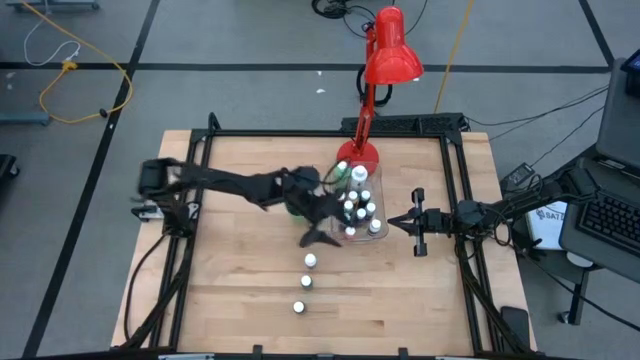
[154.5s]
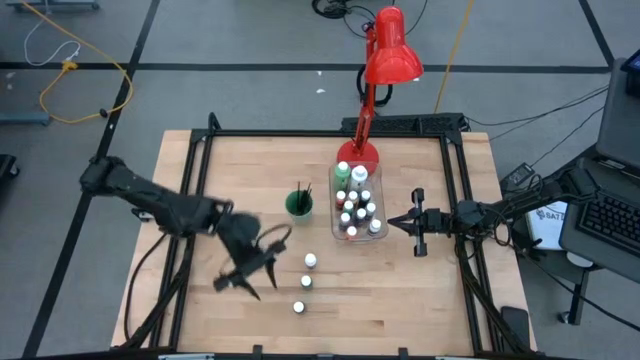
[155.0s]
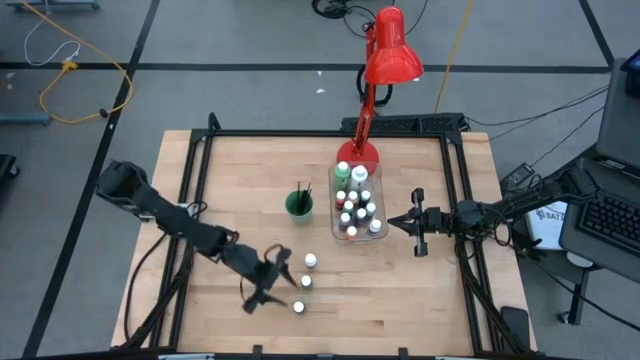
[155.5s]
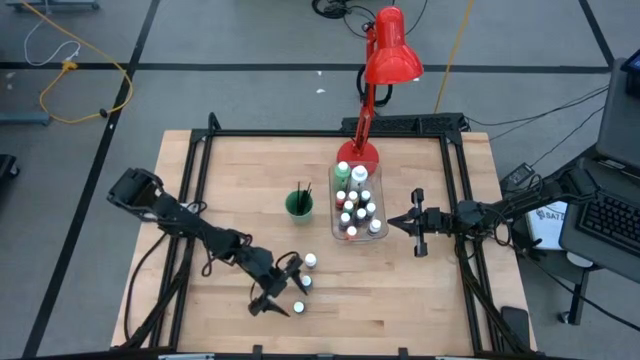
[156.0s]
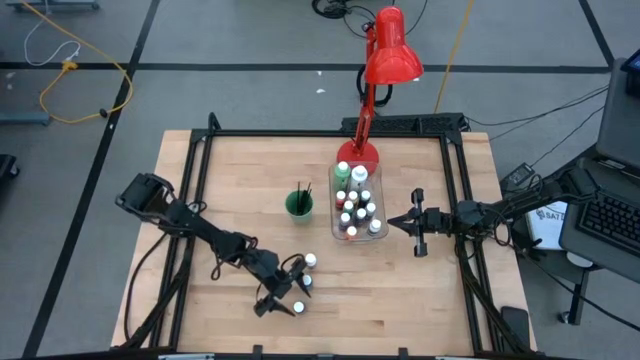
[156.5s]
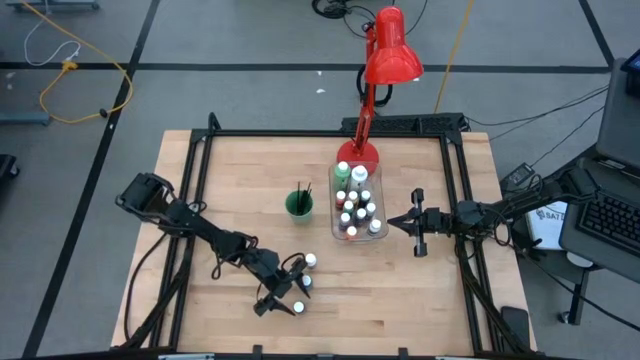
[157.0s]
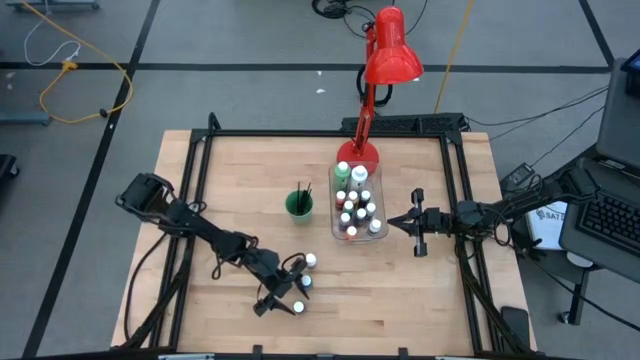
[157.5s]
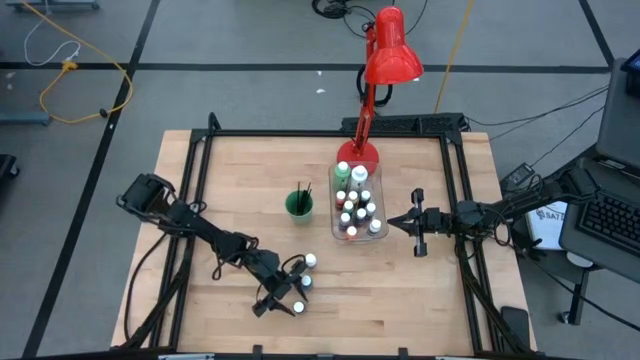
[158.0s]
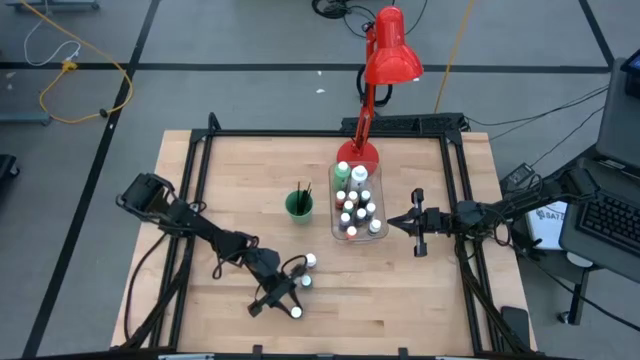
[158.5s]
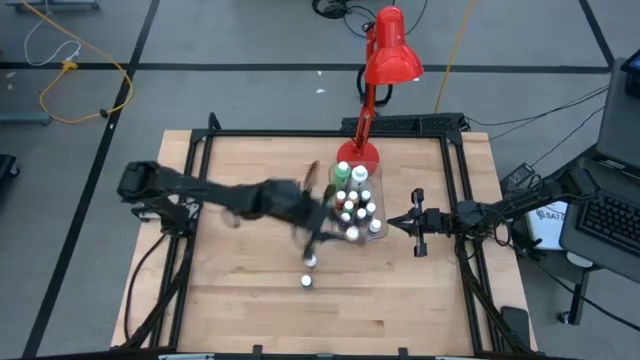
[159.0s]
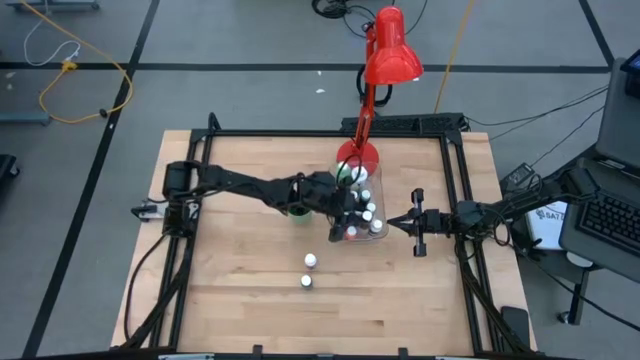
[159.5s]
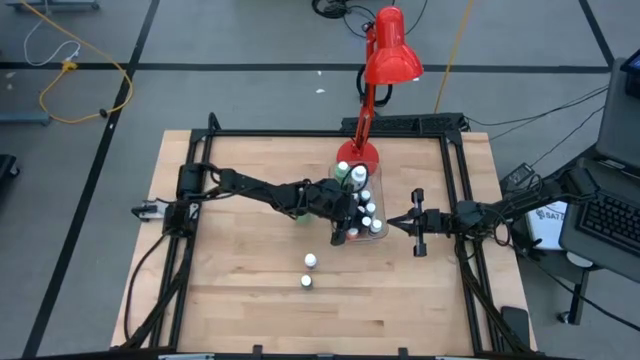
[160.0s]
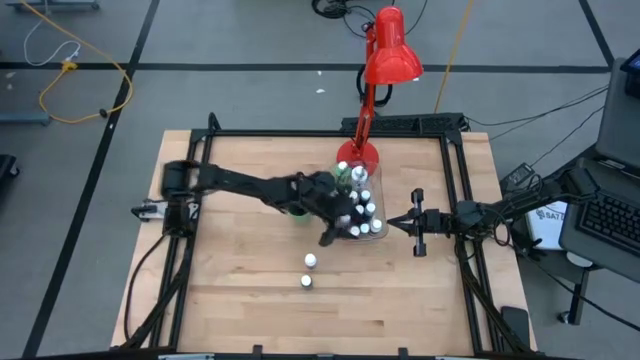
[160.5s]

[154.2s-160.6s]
Task: Pick & Place Paint Supplies
Put the black paint bottle into the transparent bin

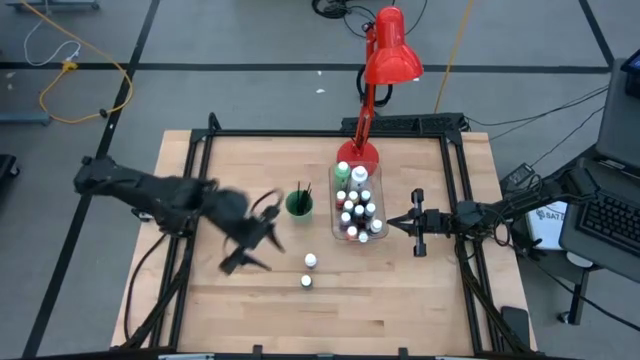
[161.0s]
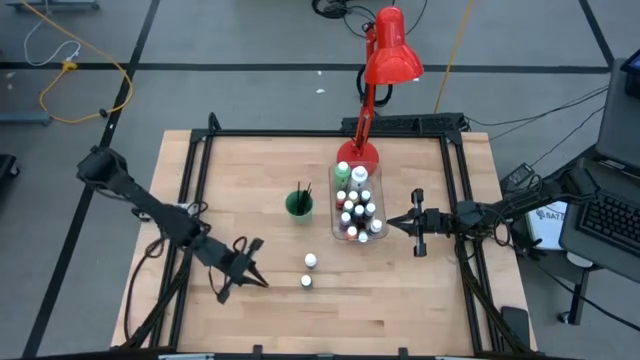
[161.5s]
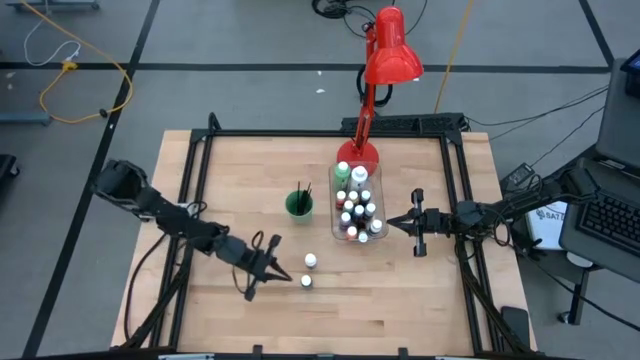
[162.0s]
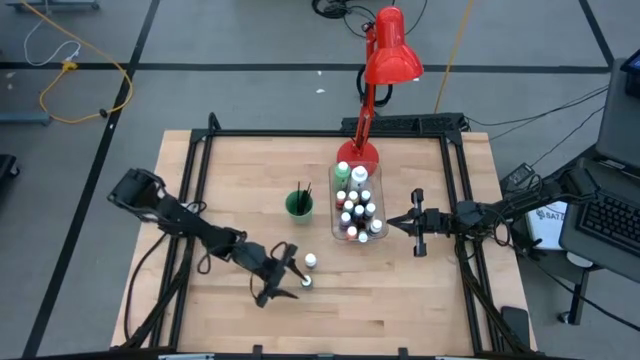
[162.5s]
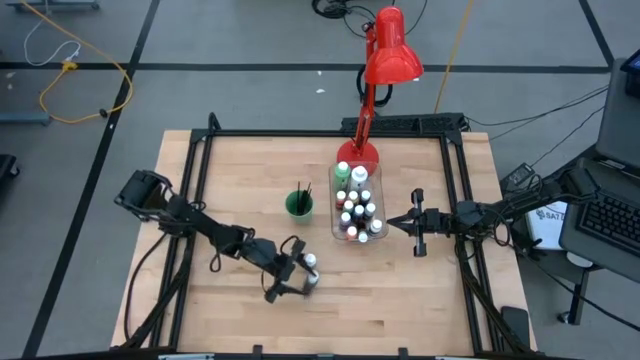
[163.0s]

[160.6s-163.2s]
Put the small green paint bottle into the transparent bin

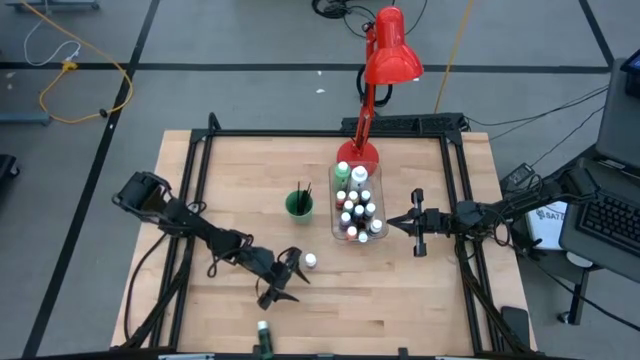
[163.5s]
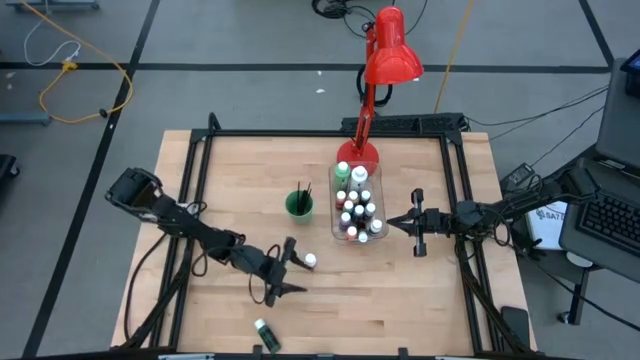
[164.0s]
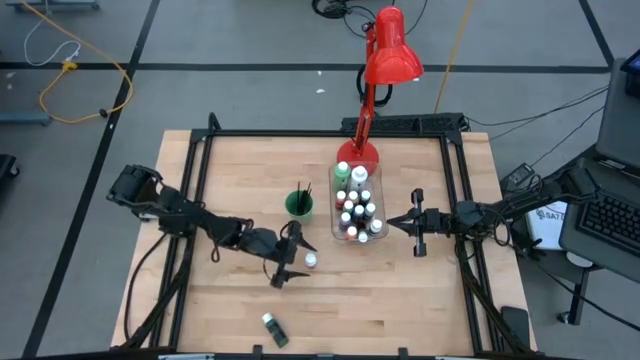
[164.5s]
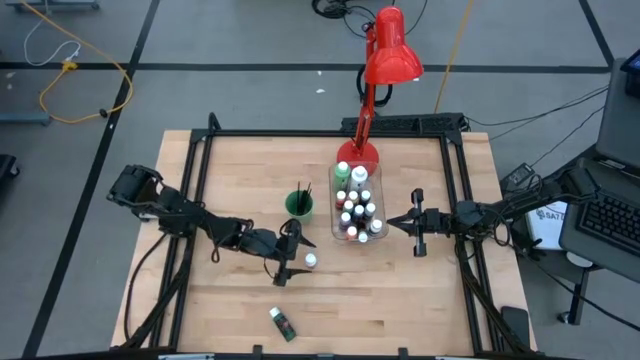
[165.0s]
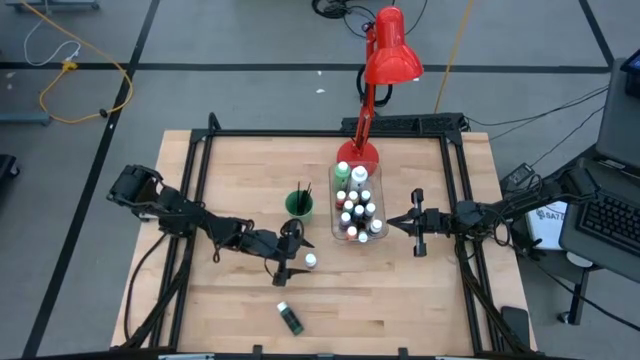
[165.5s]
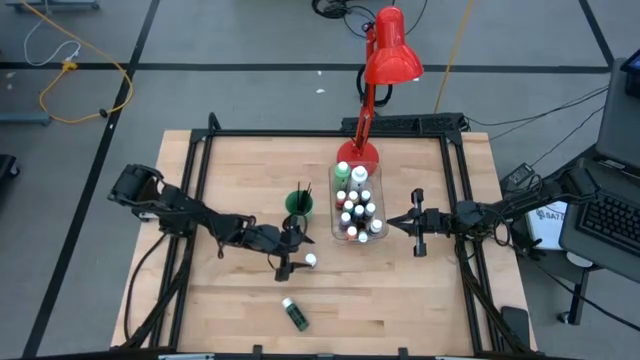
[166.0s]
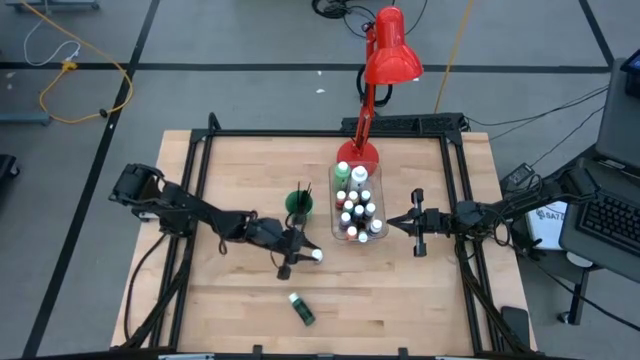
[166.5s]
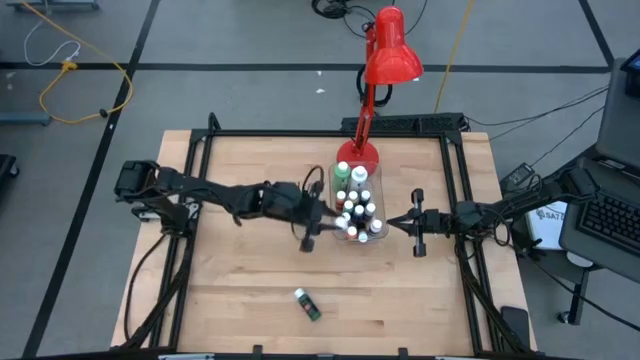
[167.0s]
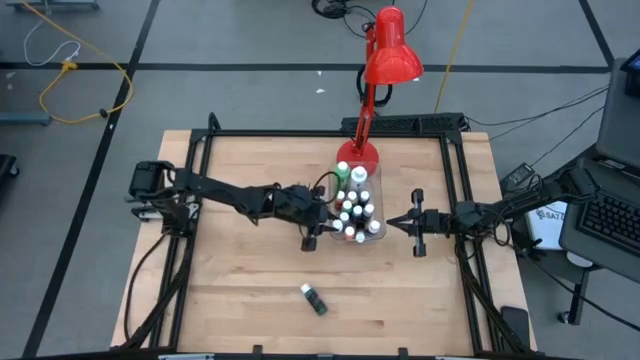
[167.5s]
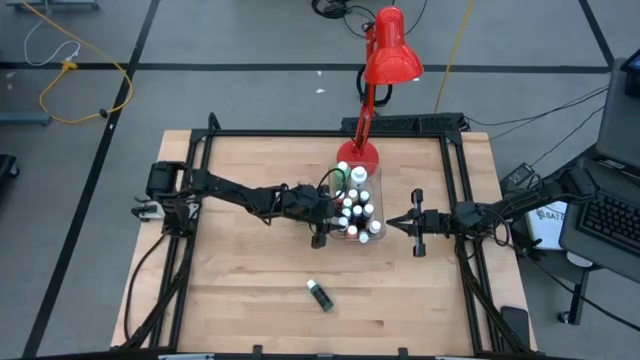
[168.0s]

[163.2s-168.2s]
Put the small white paint bottle into the transparent bin

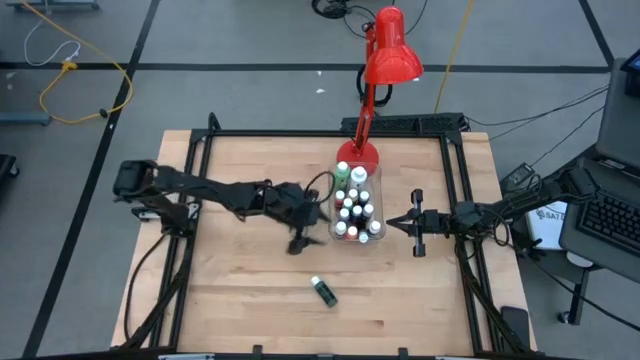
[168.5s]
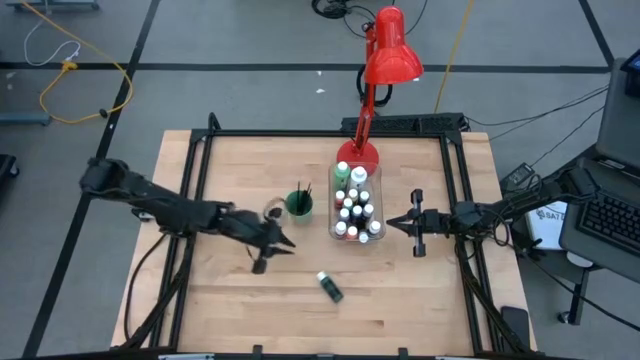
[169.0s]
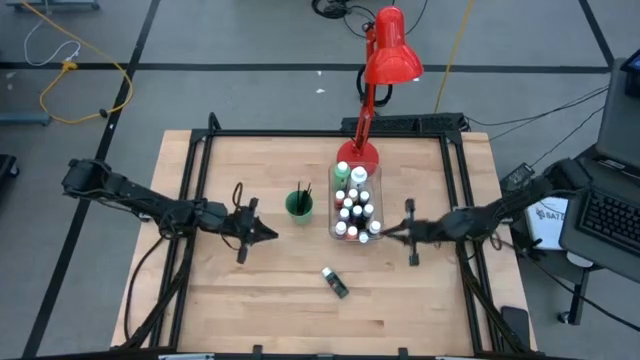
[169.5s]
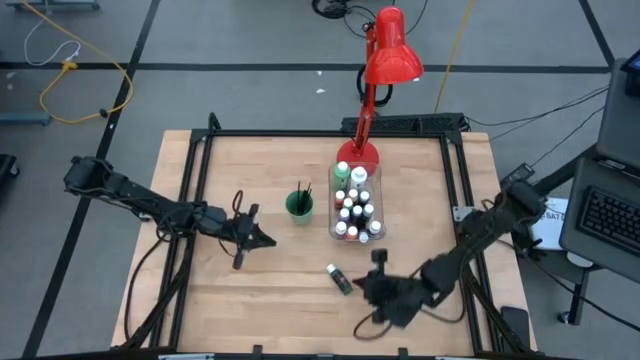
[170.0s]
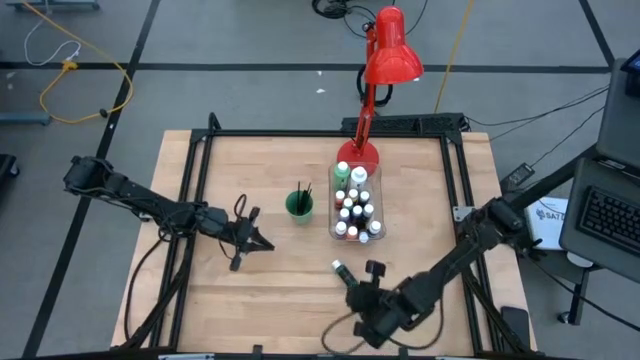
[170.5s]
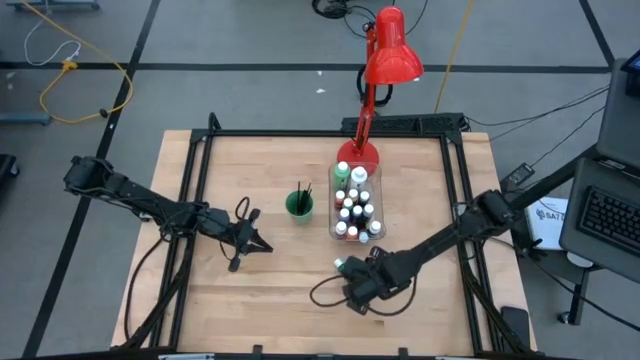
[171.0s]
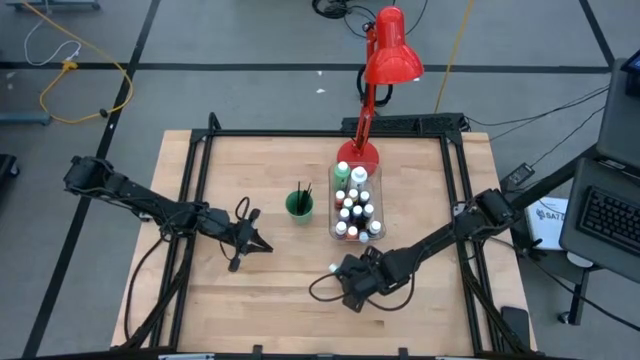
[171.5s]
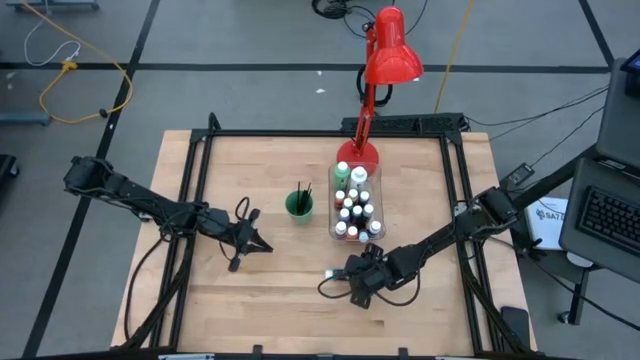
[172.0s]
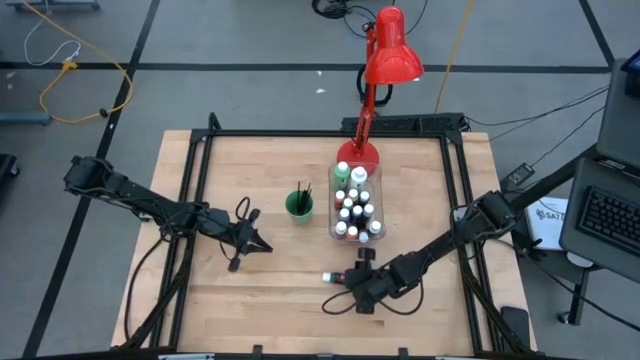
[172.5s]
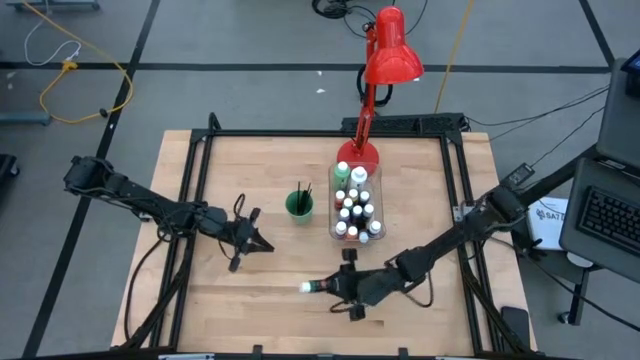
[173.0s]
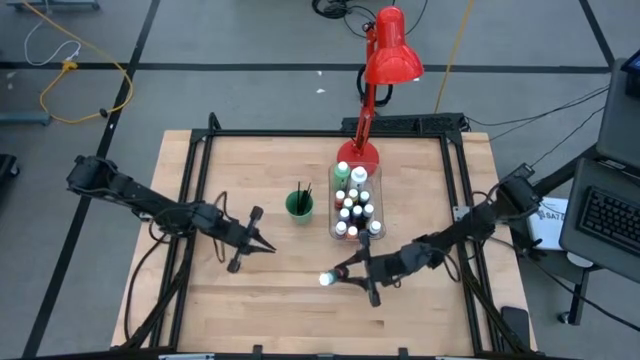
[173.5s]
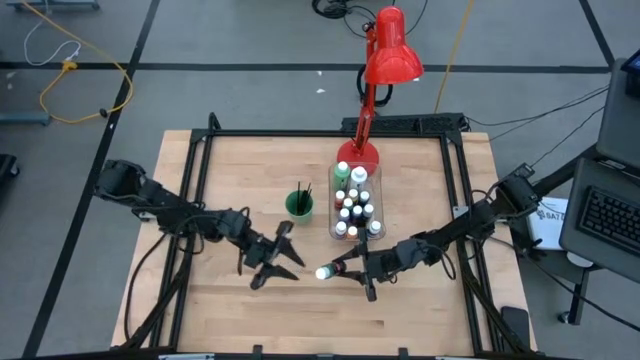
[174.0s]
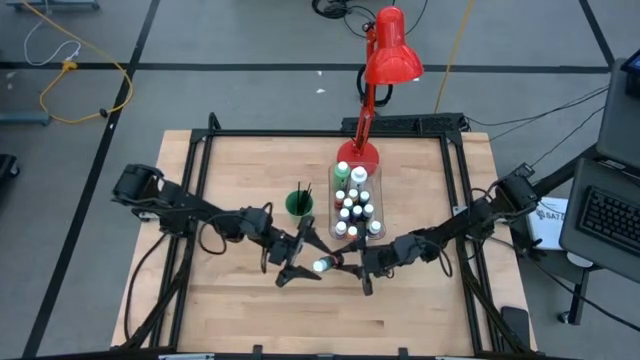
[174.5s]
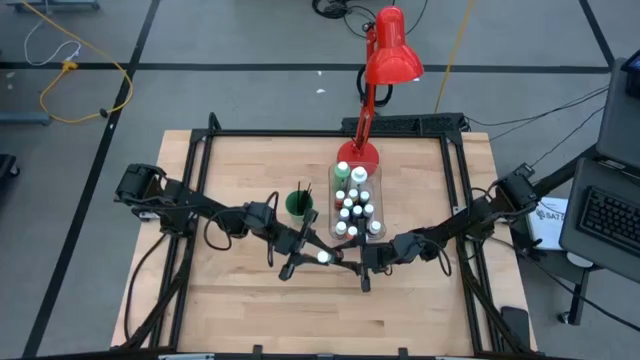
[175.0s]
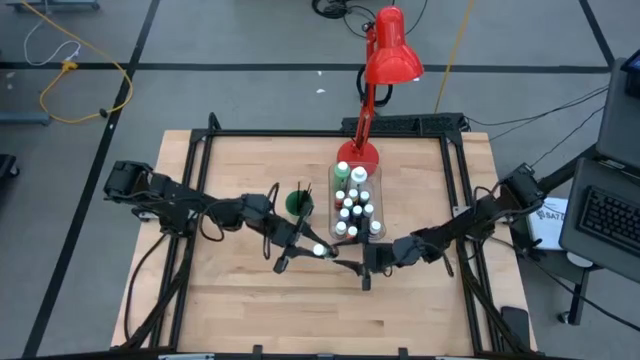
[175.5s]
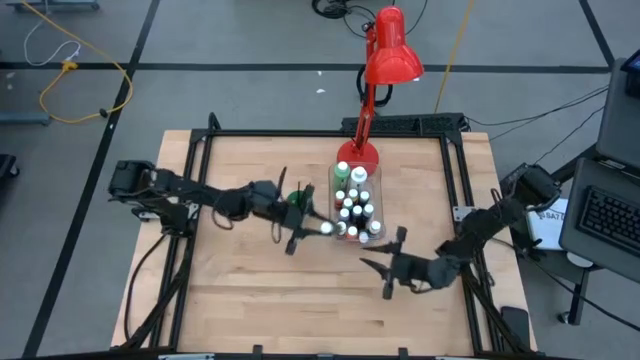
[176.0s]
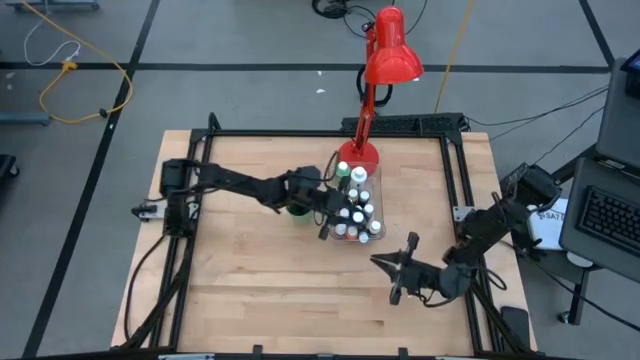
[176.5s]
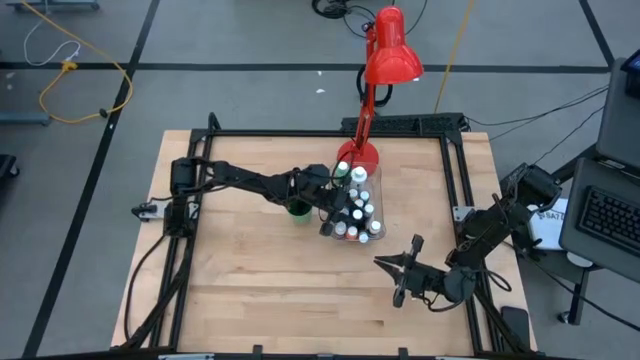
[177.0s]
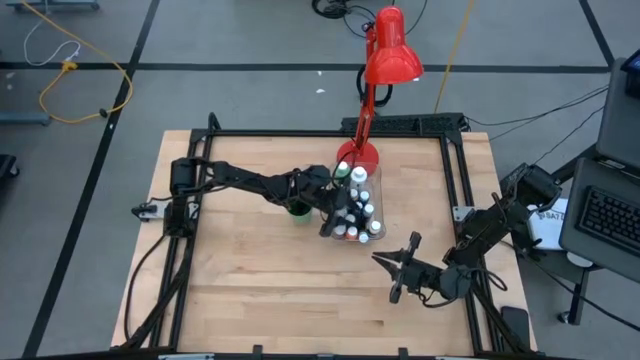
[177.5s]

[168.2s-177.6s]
Put the small green paint bottle into the transparent bin
